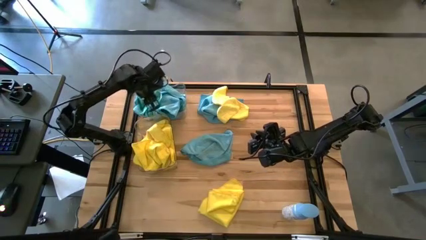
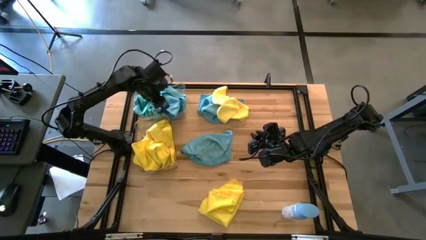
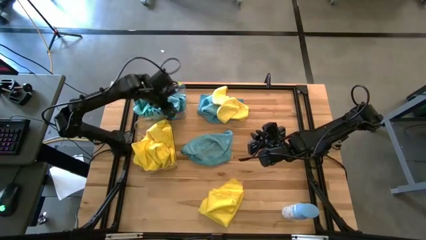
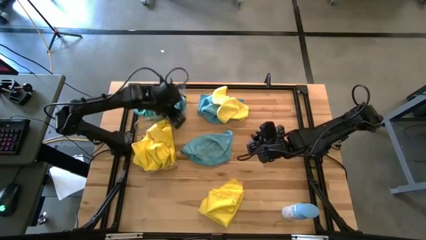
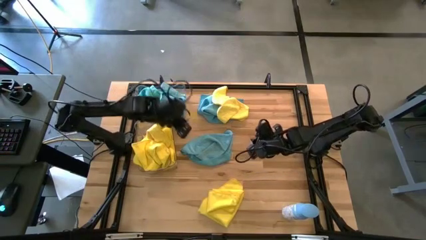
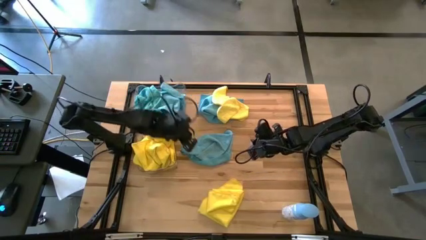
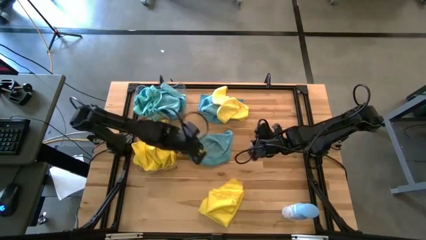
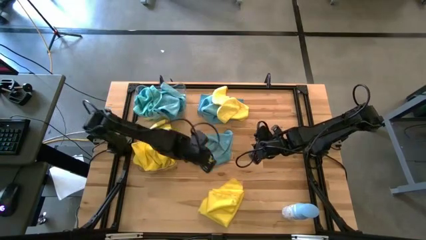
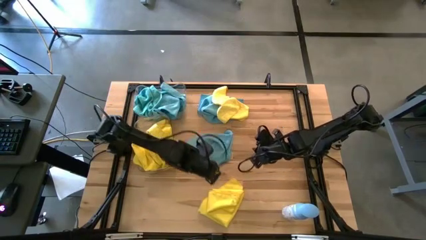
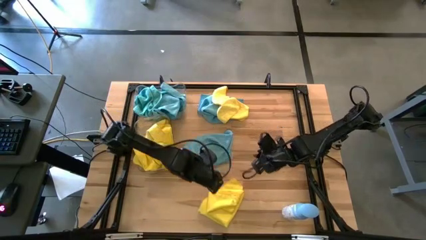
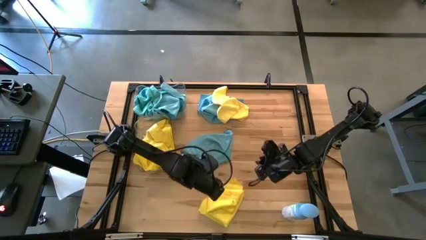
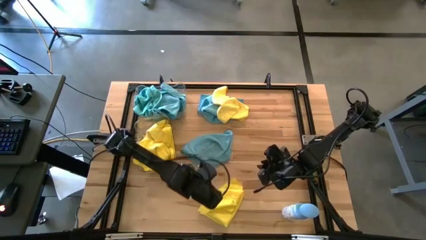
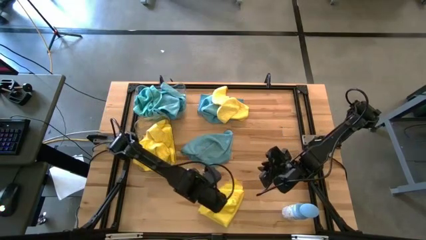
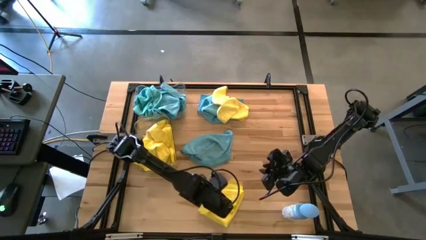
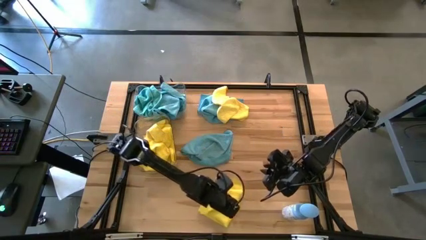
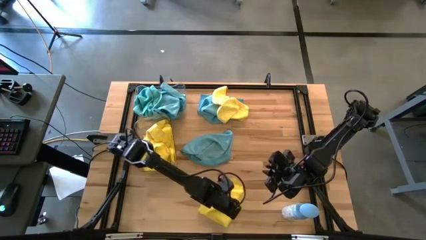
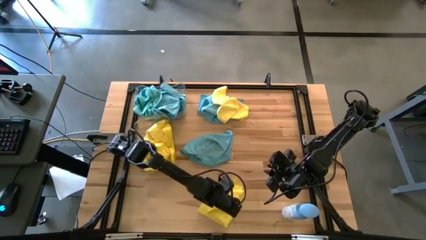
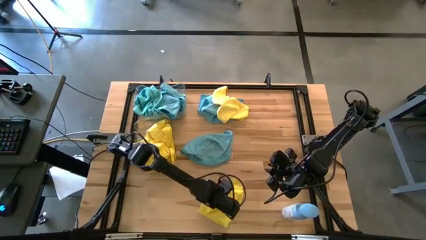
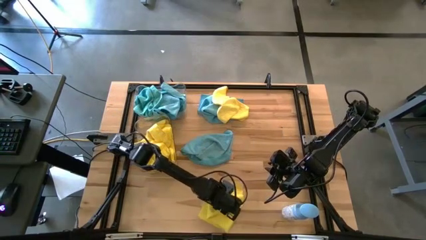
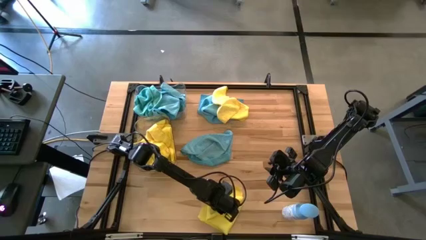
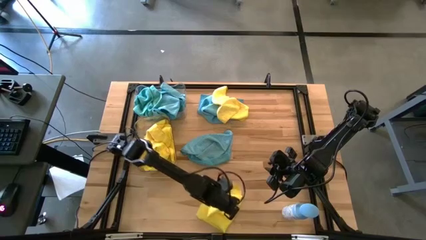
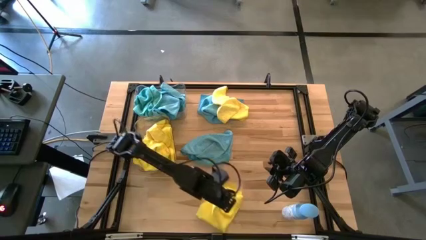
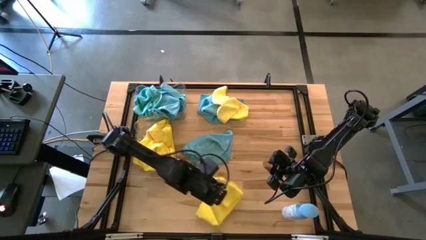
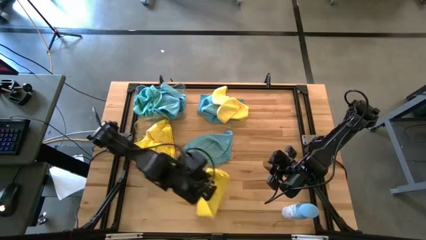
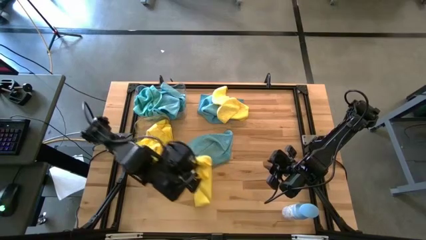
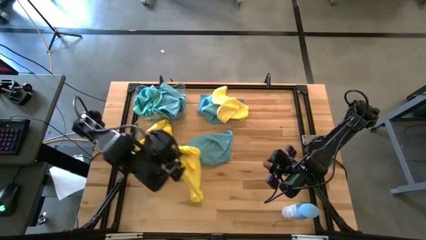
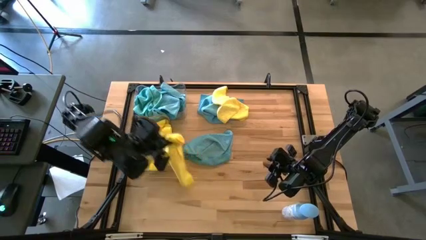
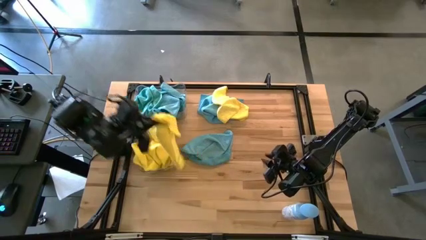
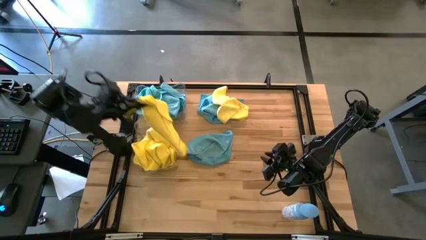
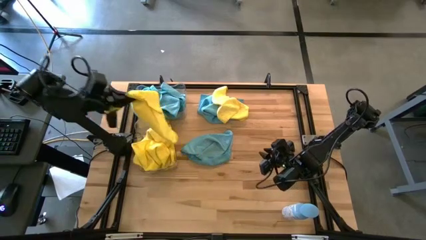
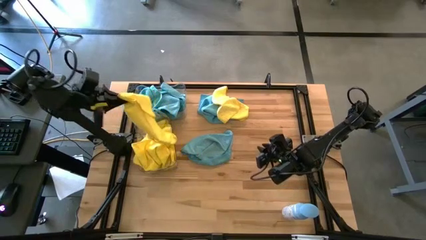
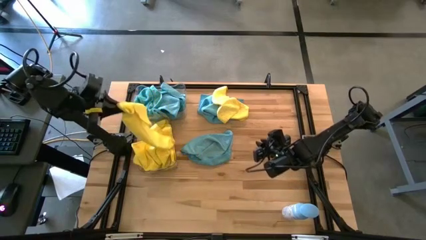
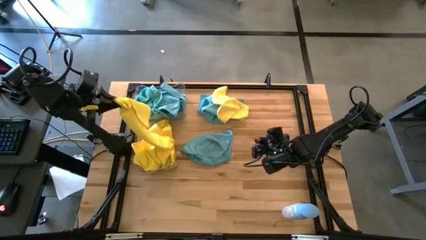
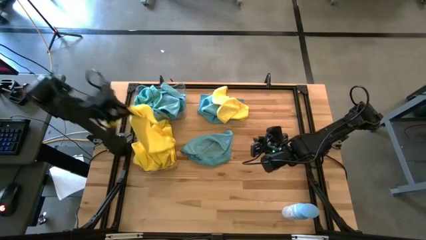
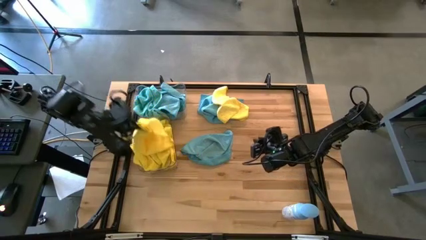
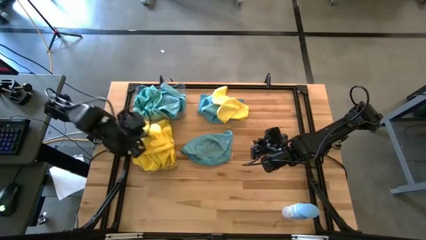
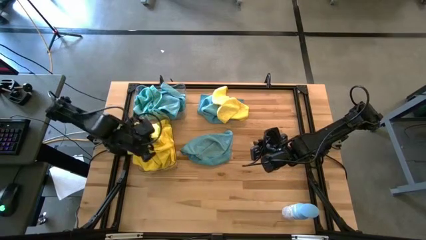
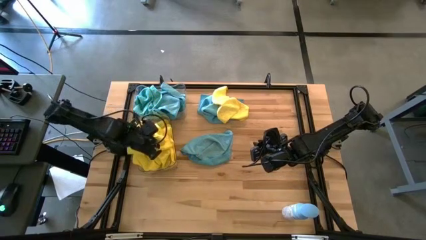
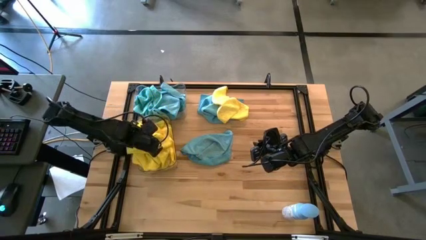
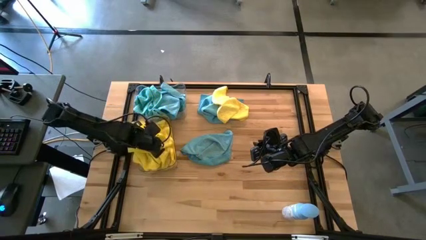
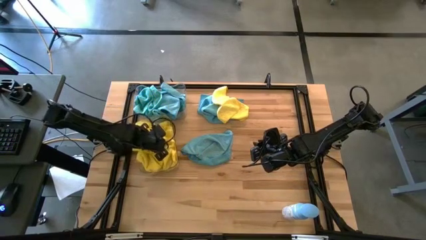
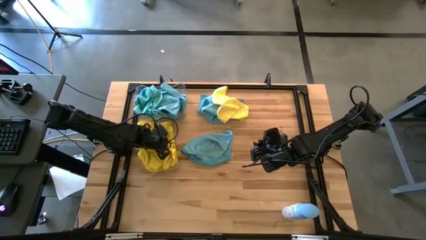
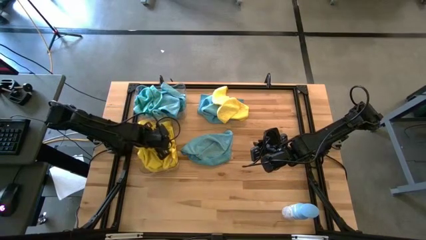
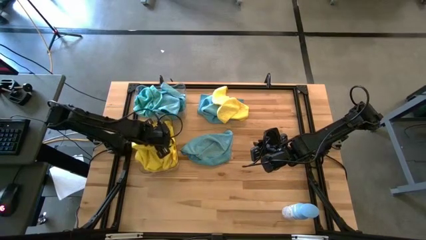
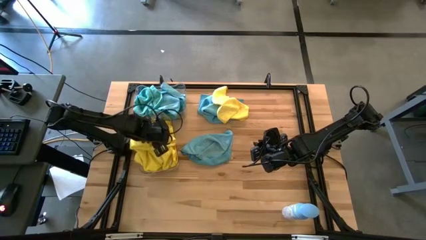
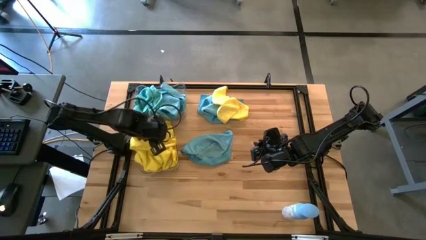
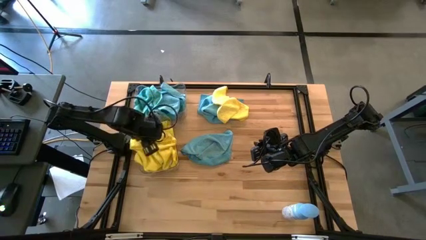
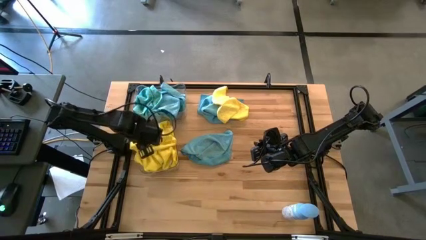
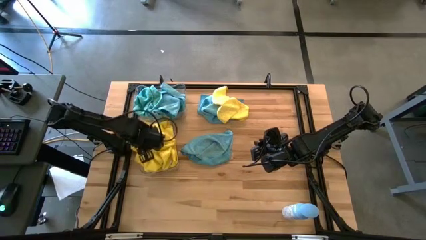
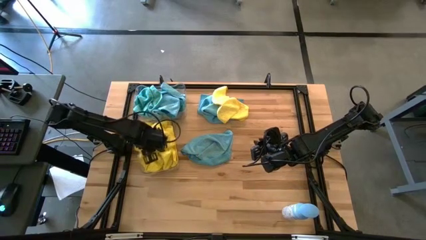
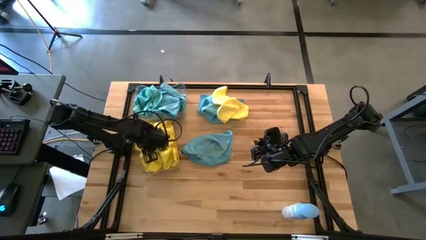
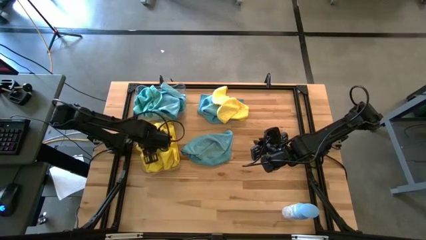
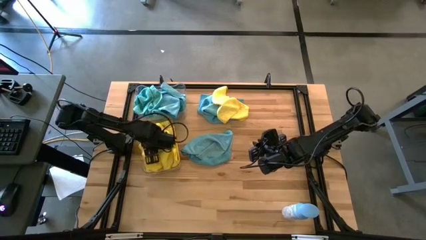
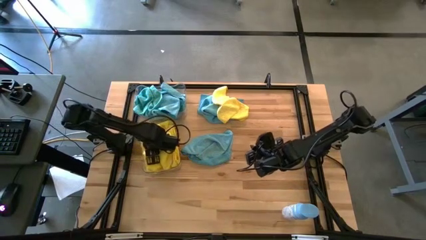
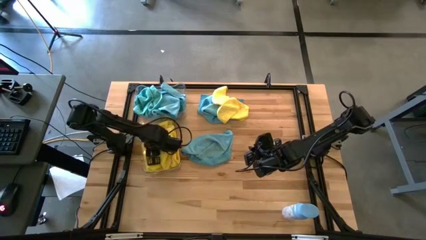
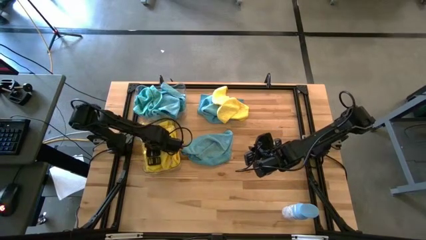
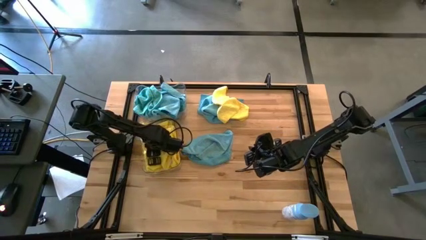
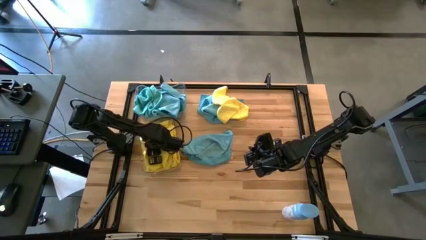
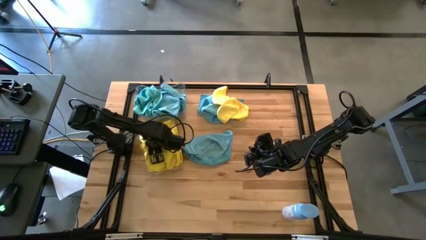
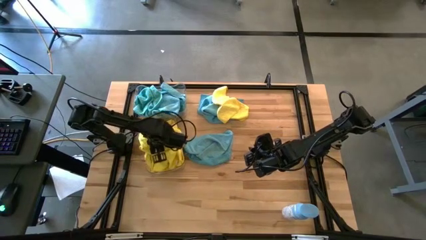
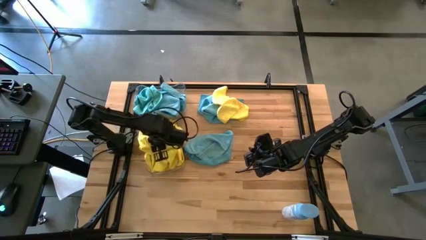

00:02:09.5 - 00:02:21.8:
Task: Sort microfiber towel by color & place in baskets
Put the yellow microfiber cloth into the bottom transparent bin
